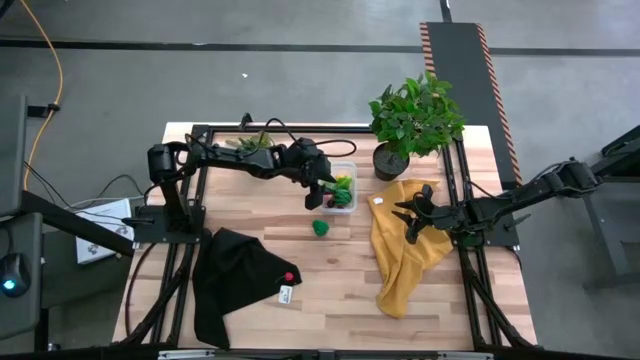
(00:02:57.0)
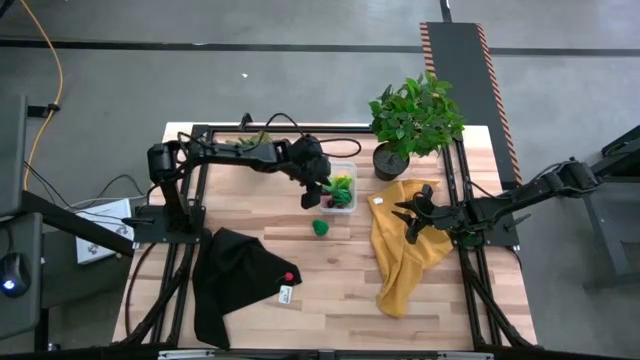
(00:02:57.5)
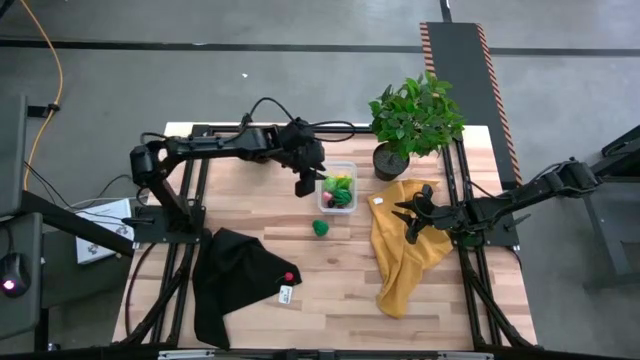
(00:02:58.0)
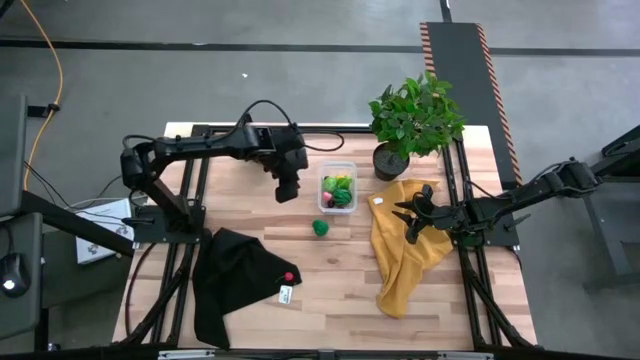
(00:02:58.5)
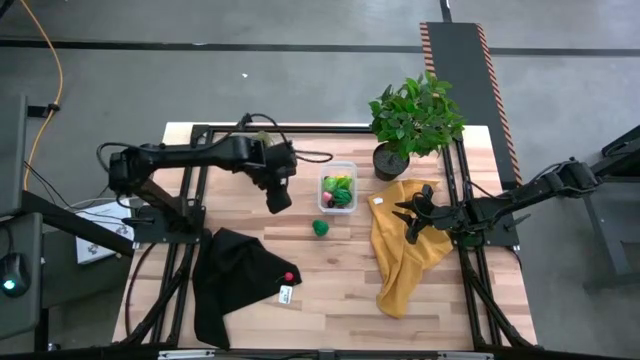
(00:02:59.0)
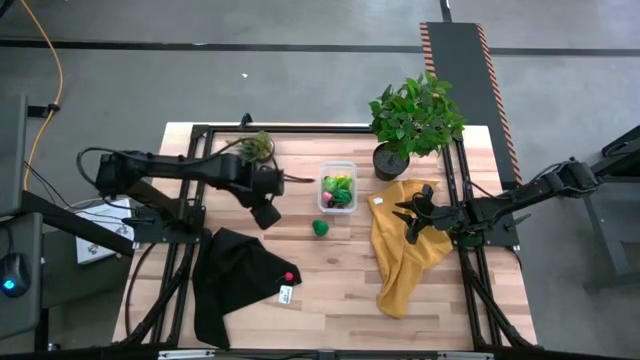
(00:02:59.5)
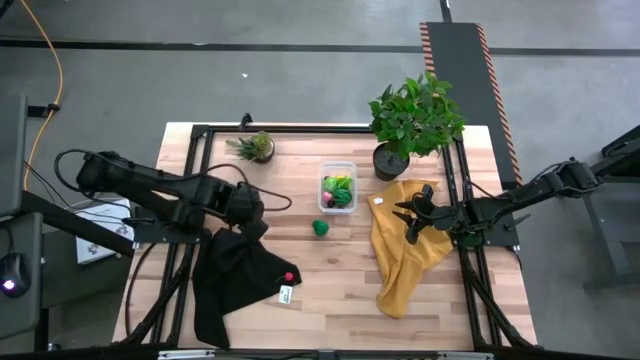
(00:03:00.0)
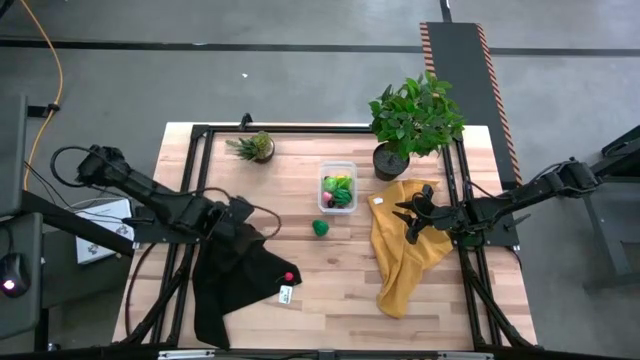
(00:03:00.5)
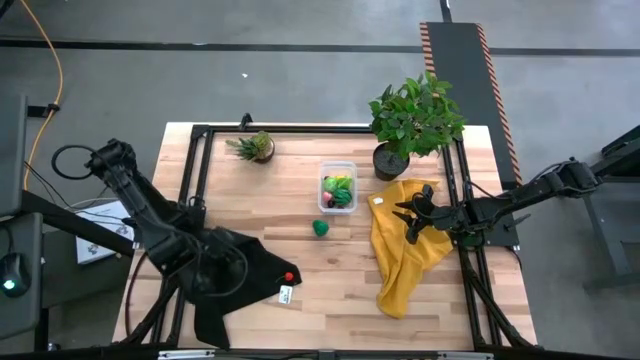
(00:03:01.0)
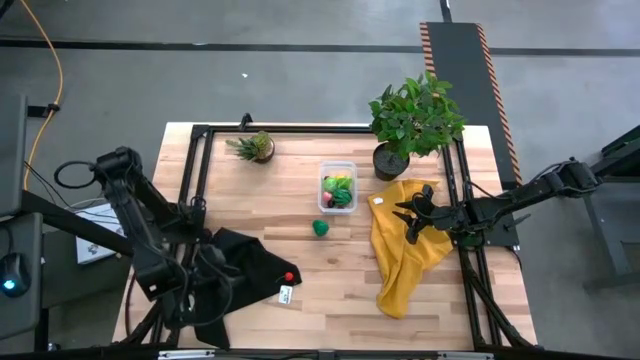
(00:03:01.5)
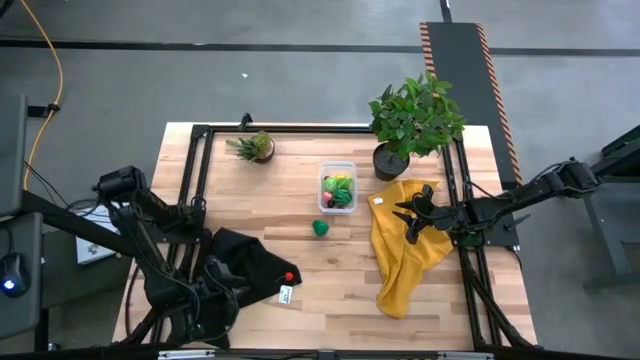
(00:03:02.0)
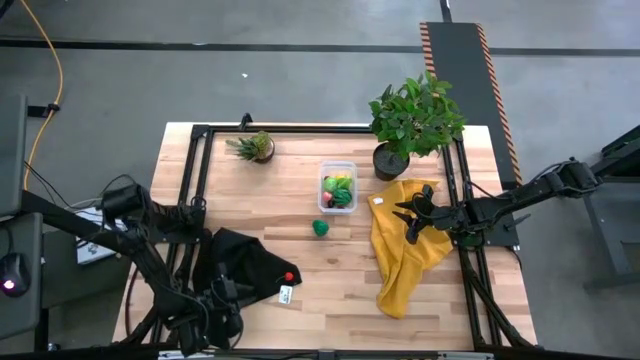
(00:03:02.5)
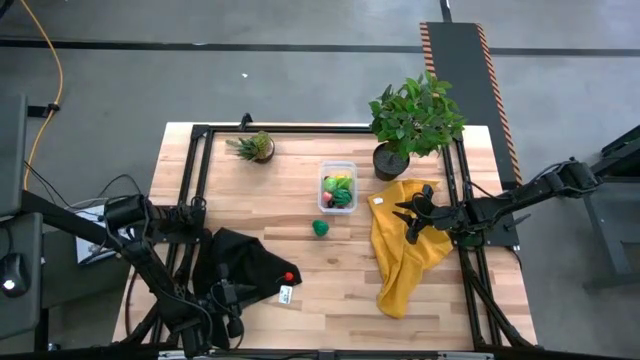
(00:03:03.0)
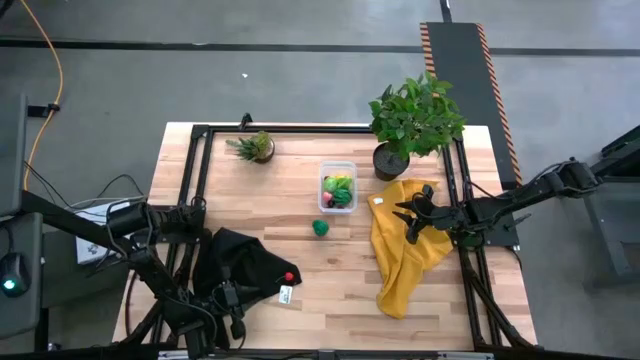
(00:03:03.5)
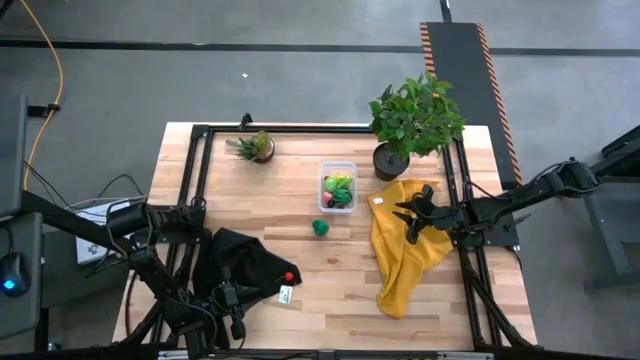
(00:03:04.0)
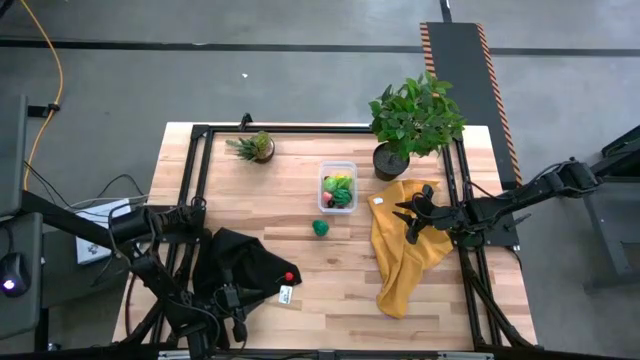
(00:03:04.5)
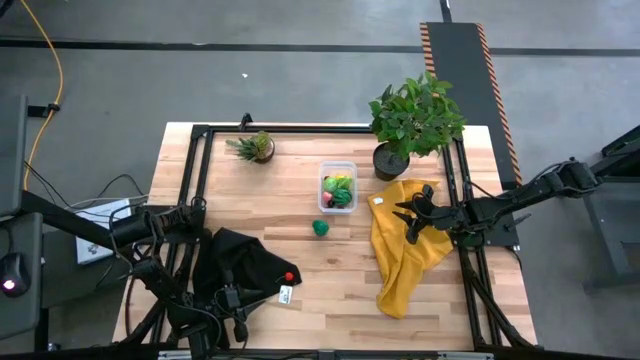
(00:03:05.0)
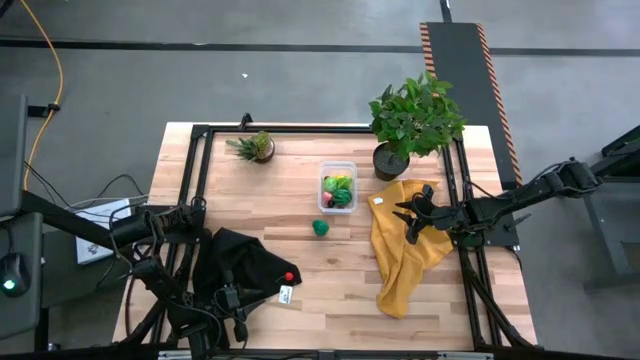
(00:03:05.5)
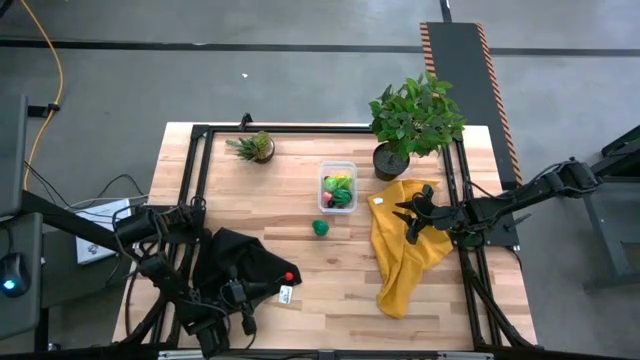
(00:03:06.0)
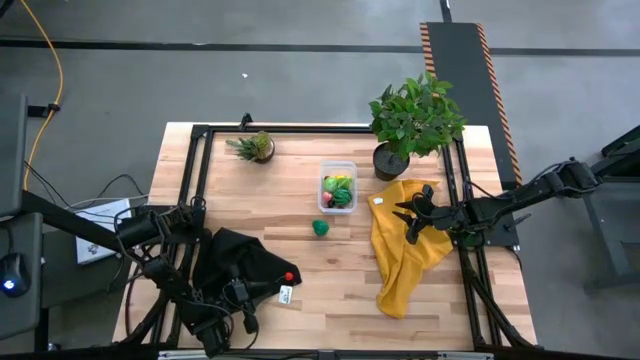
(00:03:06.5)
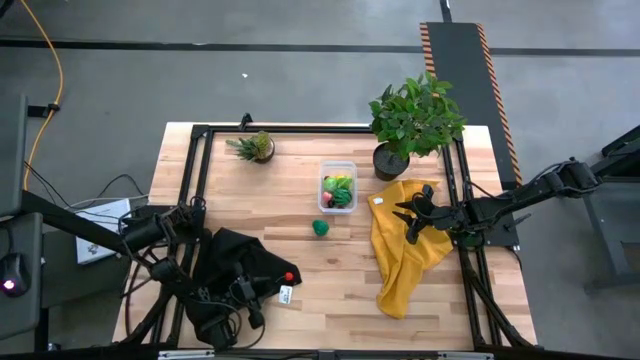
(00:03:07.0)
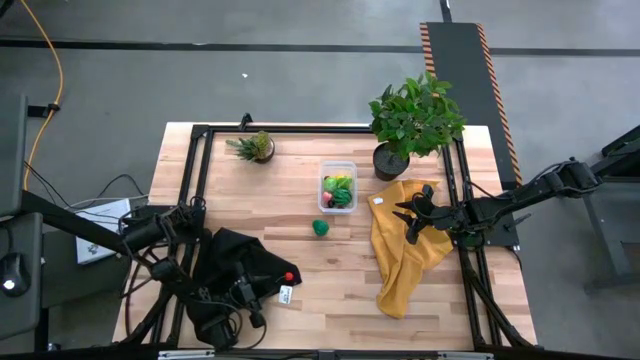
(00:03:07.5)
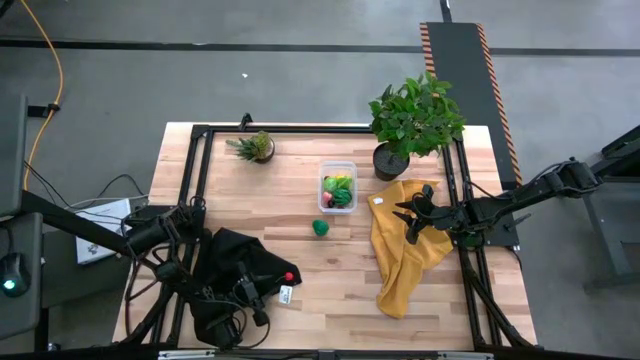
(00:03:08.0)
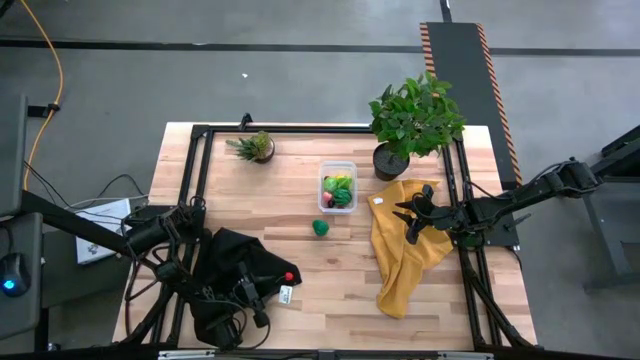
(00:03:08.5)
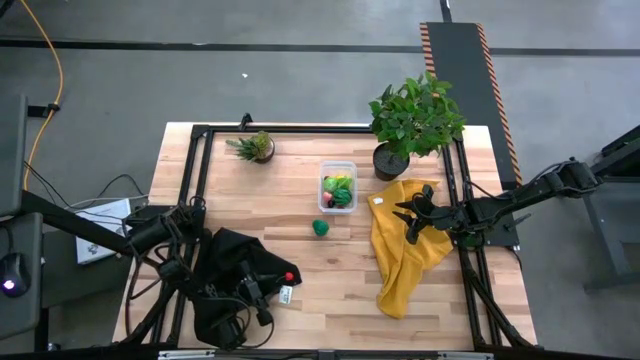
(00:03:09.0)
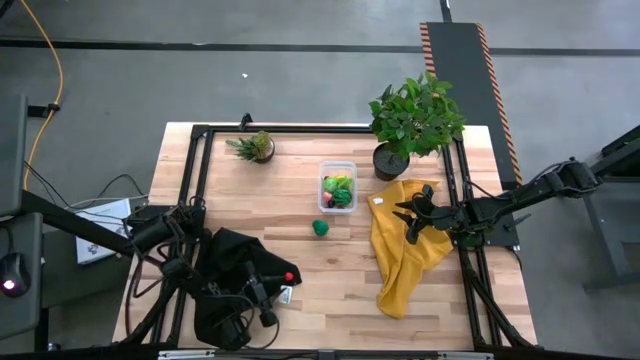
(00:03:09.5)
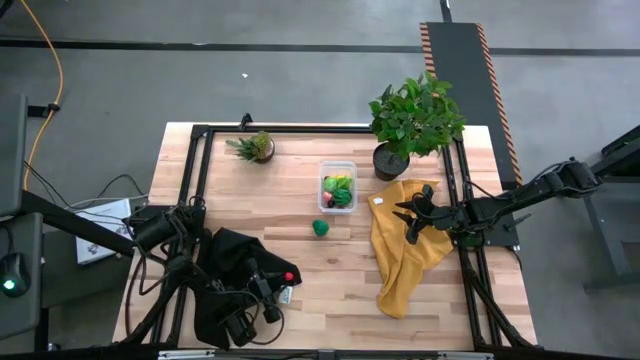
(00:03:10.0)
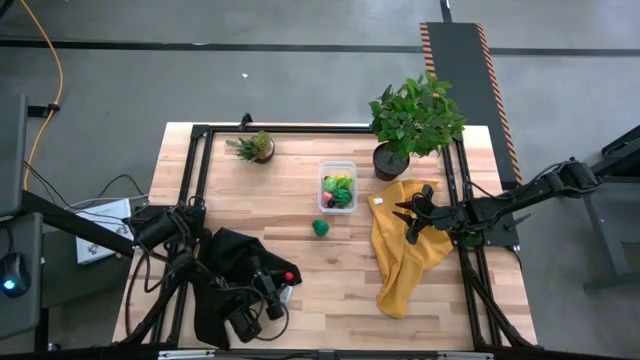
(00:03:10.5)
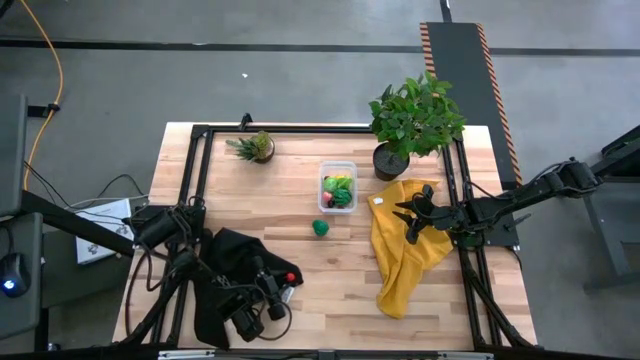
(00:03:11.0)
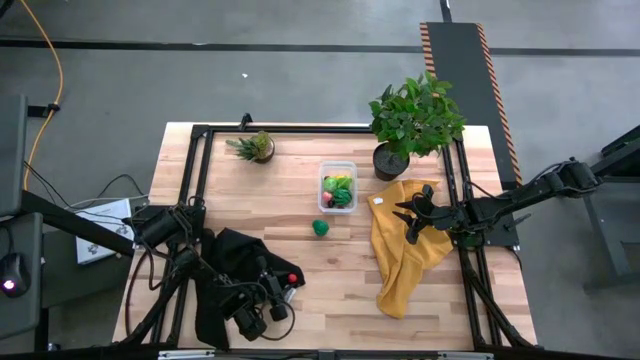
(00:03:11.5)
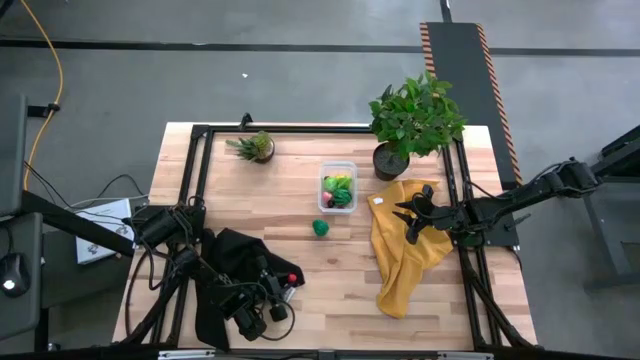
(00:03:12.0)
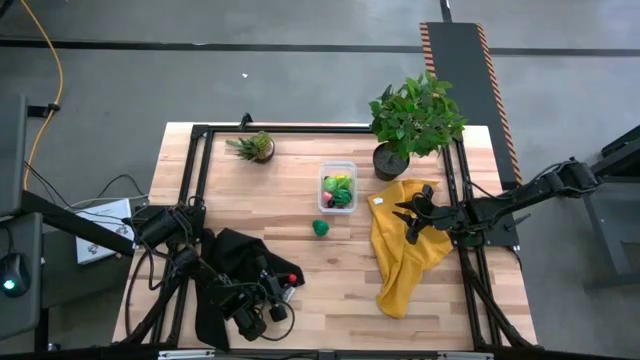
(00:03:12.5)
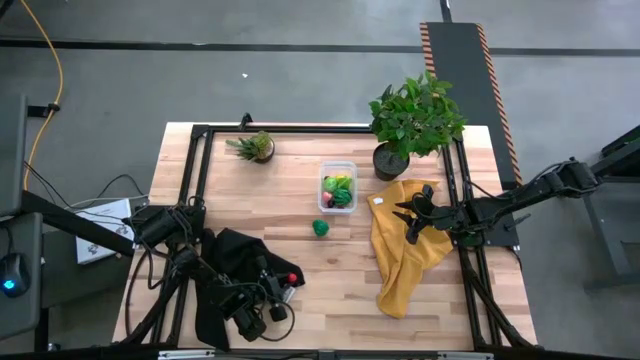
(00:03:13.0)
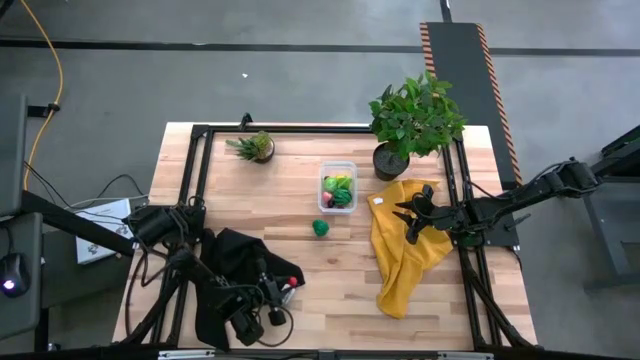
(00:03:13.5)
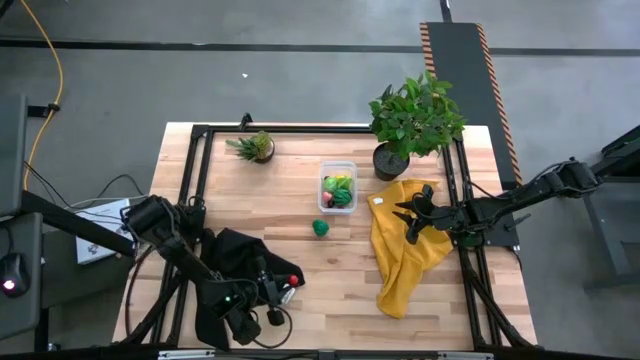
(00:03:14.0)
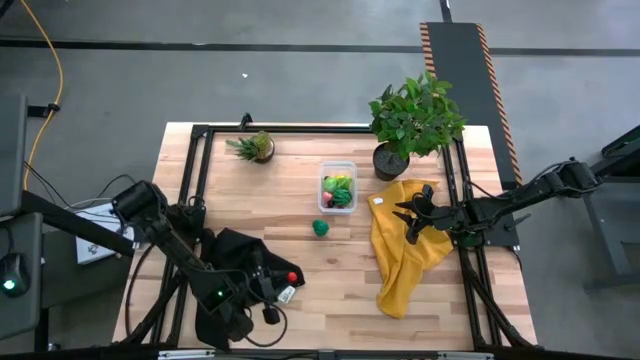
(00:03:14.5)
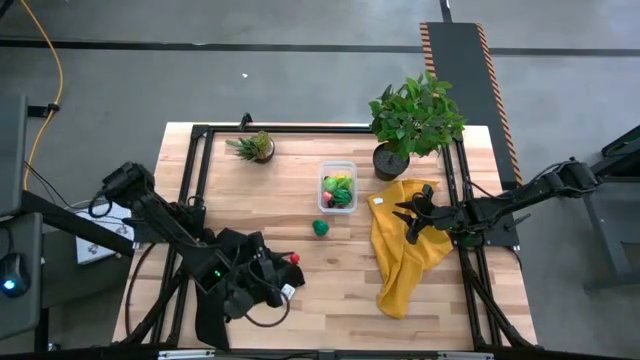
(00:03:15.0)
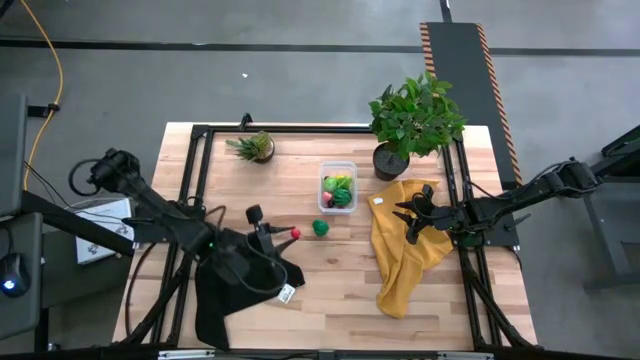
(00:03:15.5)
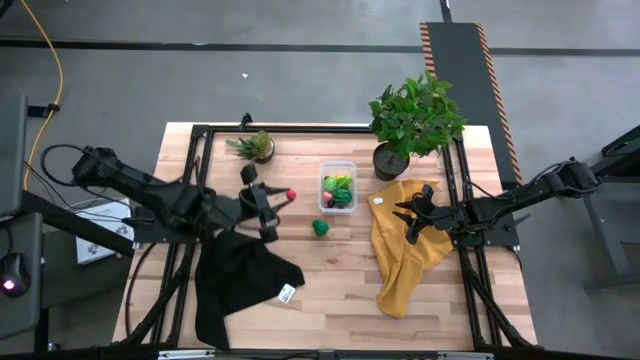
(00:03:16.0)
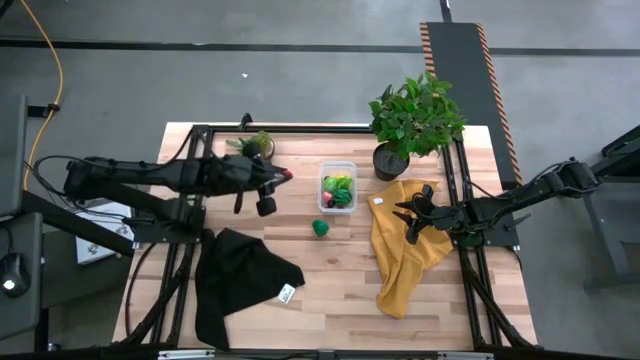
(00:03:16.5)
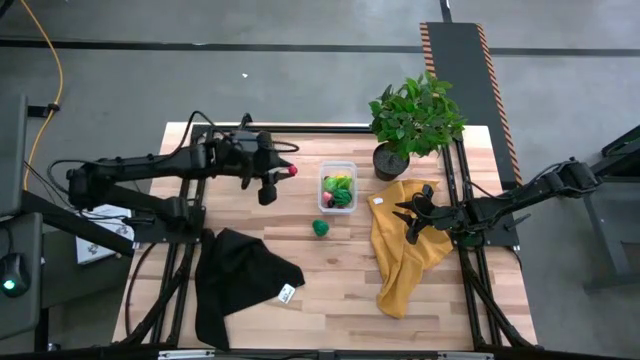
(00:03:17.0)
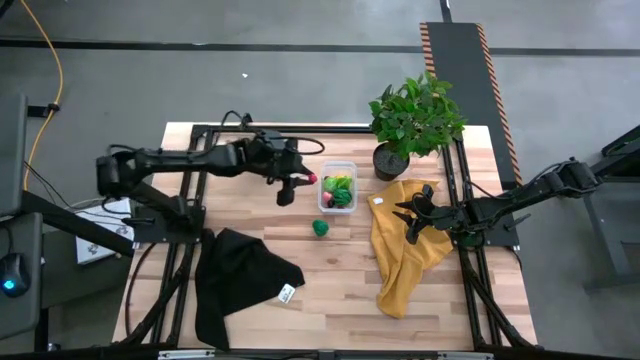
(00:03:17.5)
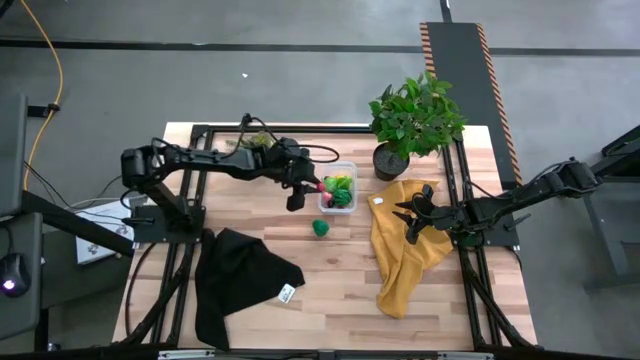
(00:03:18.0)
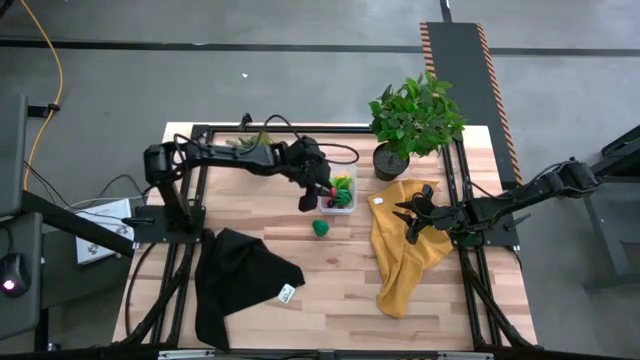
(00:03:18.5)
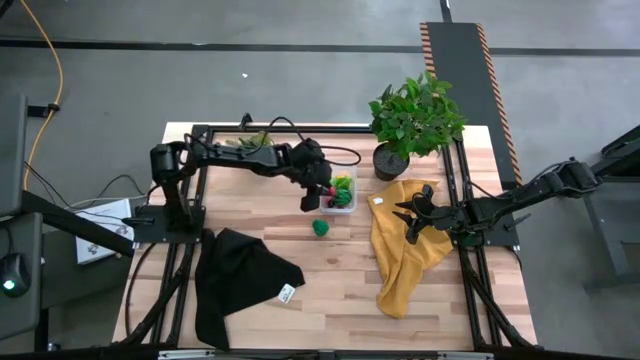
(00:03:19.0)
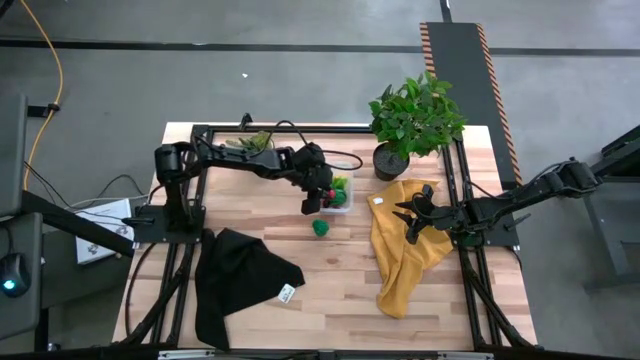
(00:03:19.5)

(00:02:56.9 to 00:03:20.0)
Task: Pick and placing Produce into tupperware
Put the red cherry into the transparent bin
